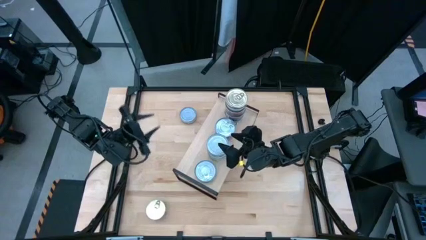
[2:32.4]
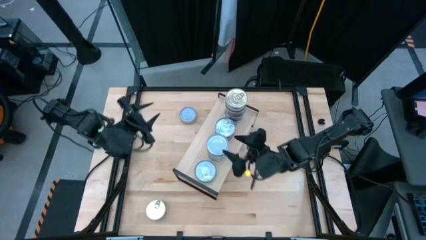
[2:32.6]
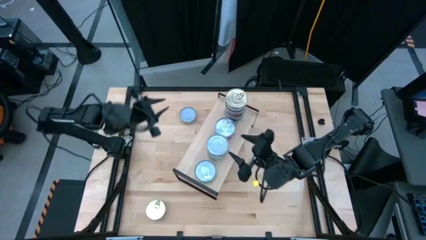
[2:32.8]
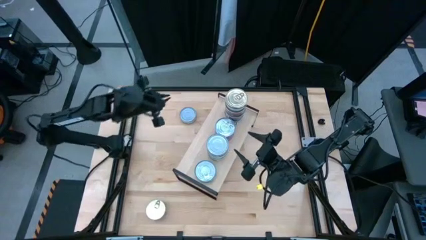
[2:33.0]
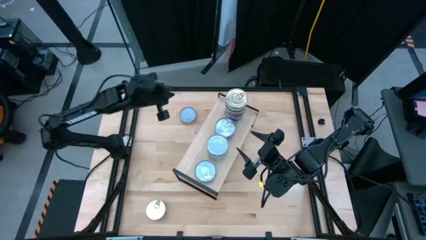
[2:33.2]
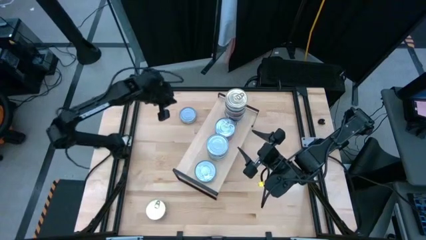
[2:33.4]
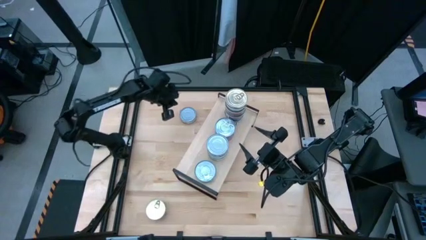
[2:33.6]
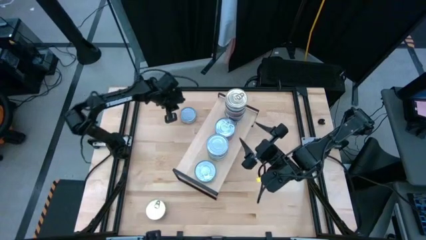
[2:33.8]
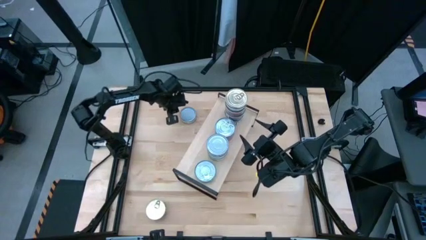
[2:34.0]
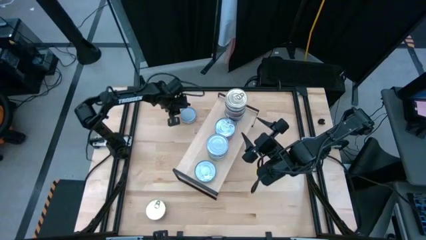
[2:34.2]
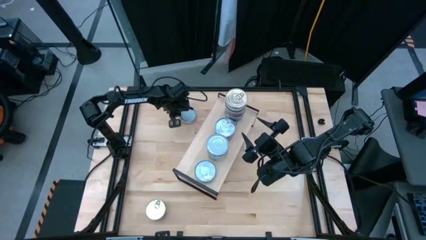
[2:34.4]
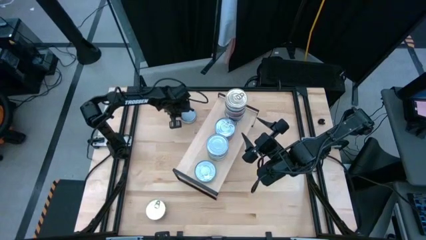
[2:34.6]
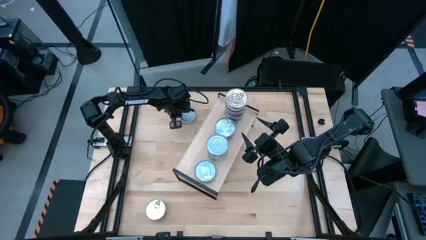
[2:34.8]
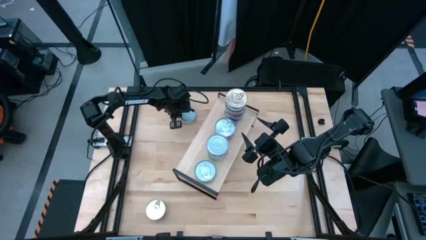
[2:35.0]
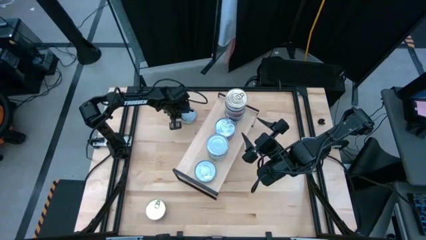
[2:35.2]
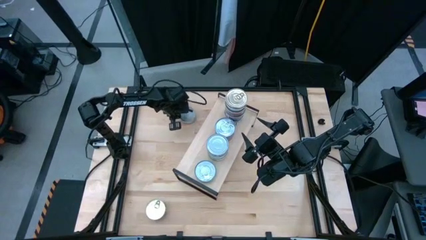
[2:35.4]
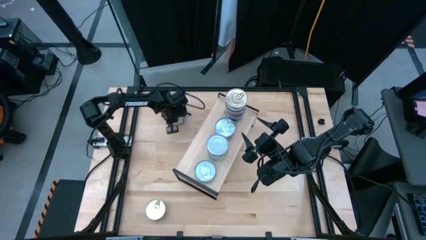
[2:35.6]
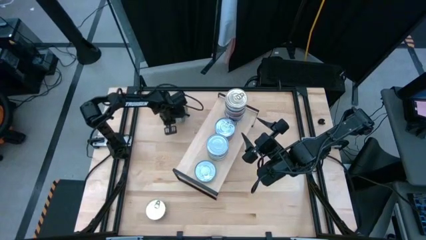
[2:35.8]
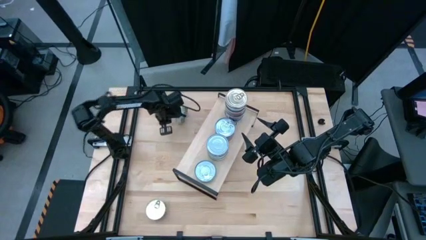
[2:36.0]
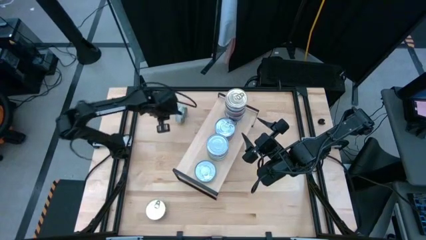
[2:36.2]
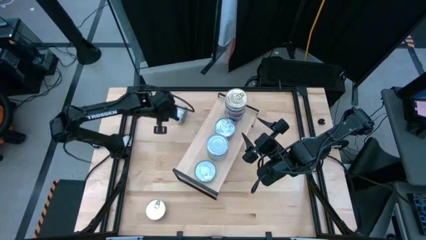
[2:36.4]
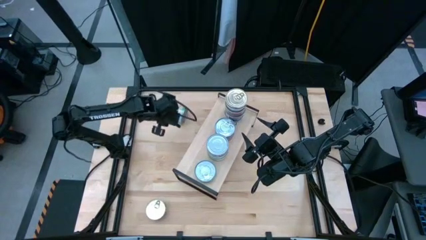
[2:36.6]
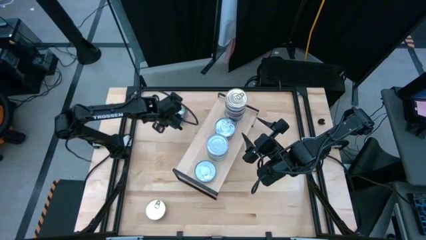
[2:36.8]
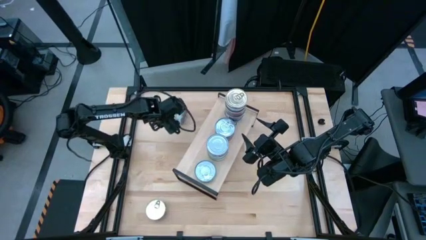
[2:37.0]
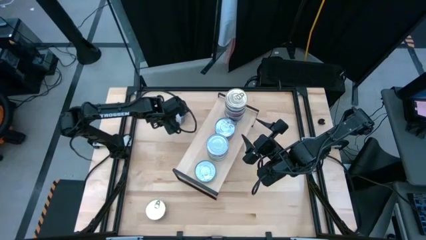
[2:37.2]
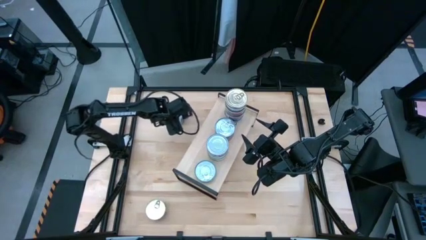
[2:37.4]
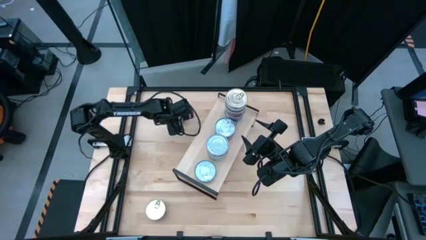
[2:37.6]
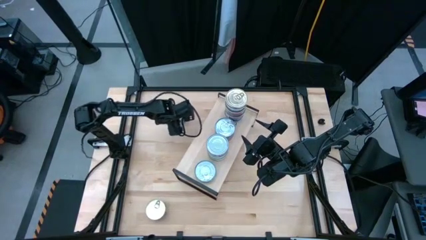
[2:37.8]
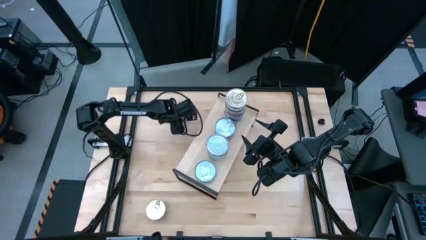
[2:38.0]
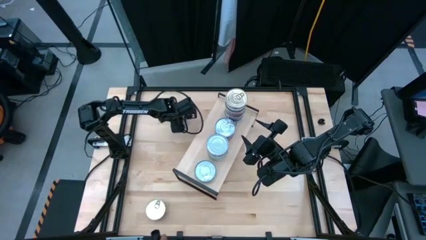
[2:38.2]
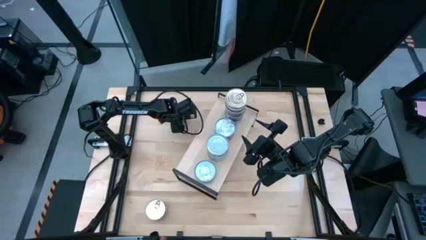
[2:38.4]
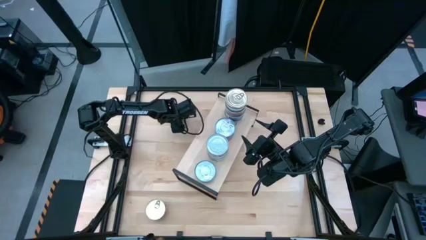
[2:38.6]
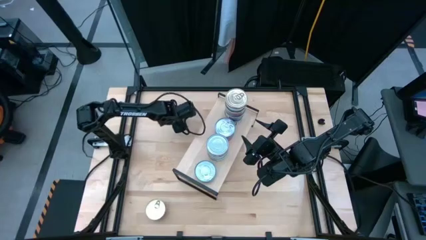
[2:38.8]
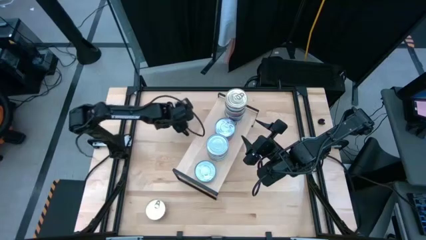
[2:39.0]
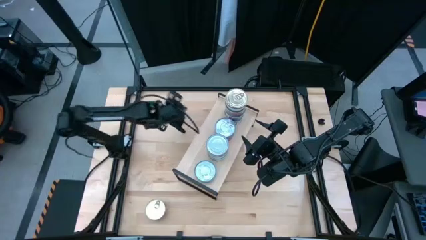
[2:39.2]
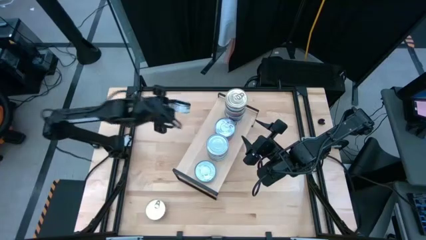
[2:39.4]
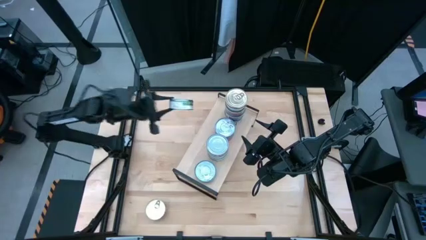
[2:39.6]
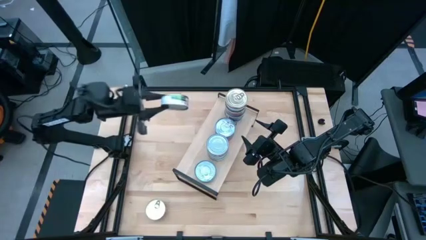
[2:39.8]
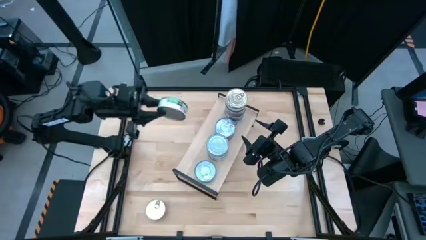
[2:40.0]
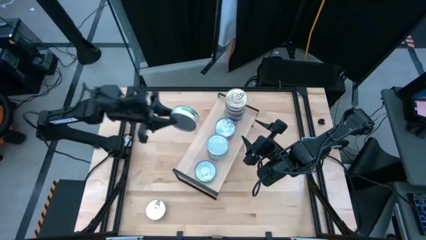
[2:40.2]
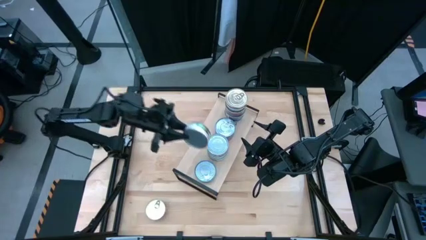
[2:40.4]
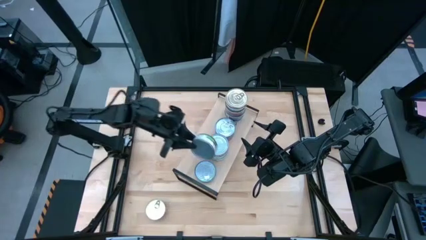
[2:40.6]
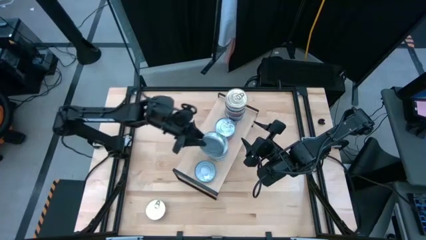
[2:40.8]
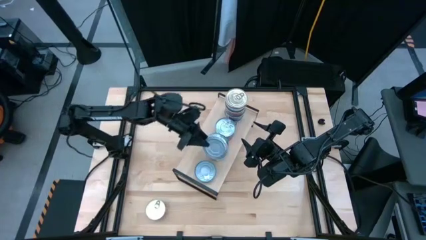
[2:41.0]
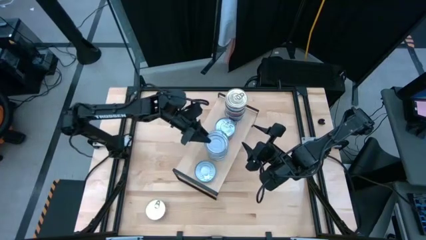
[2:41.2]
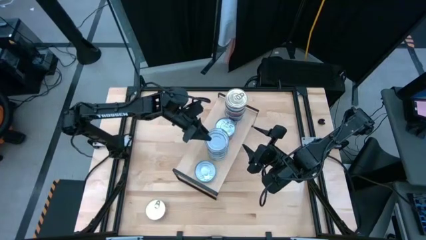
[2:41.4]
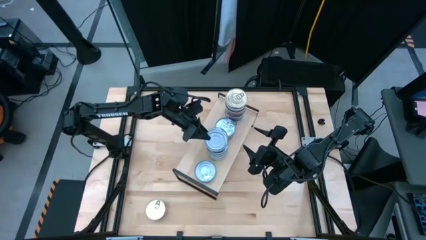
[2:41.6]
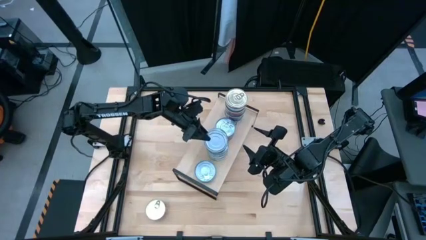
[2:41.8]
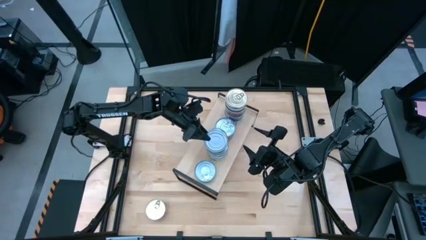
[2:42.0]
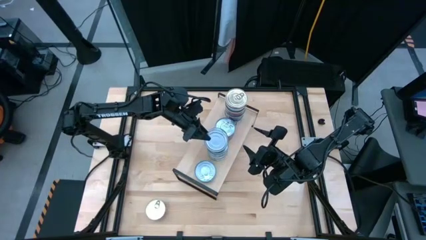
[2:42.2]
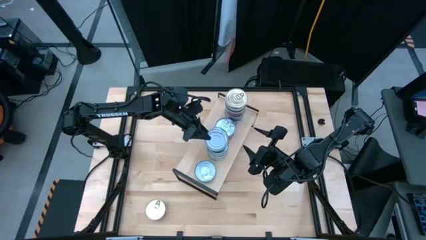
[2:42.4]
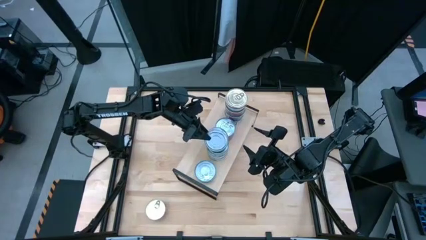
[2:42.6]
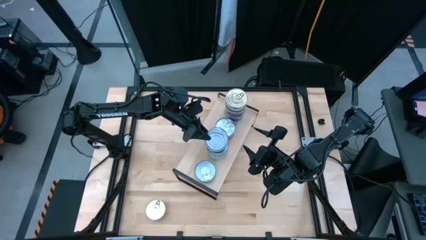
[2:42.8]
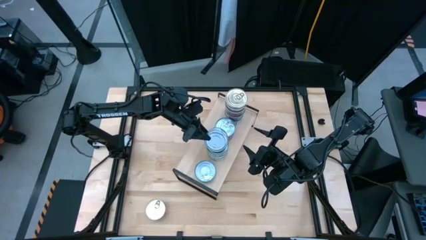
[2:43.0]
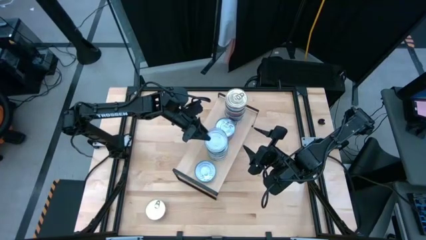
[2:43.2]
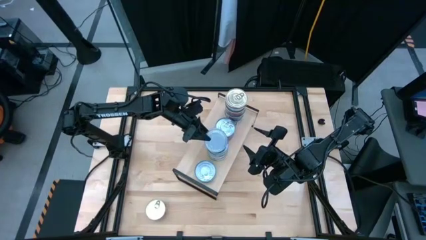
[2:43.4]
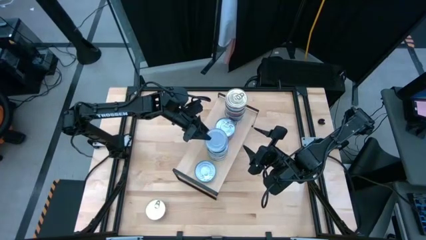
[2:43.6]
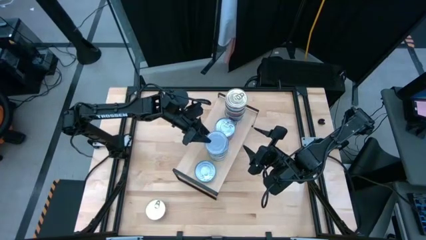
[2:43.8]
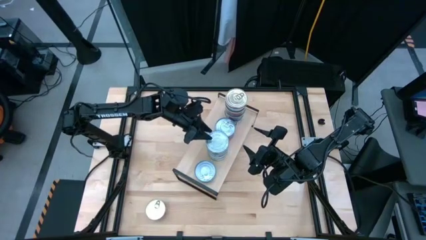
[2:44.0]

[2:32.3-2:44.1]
Task: Stack canned seafood by type on shelf
Stack the green tuna can on top of the green tuna can on the shelf

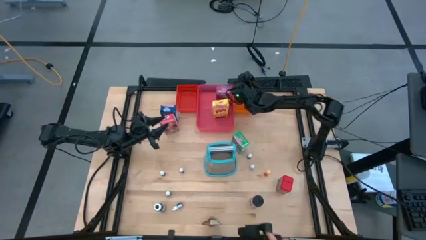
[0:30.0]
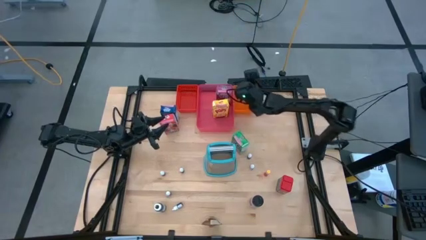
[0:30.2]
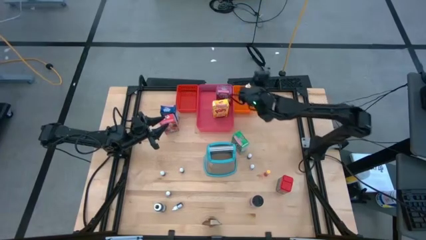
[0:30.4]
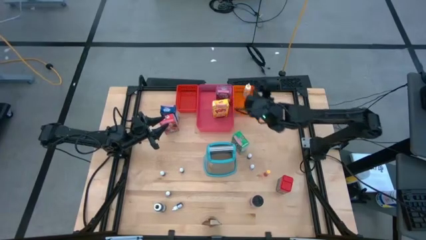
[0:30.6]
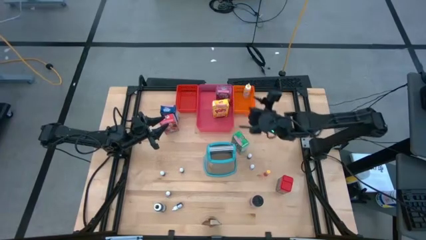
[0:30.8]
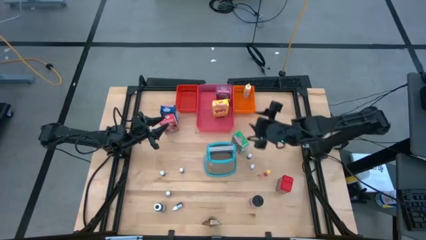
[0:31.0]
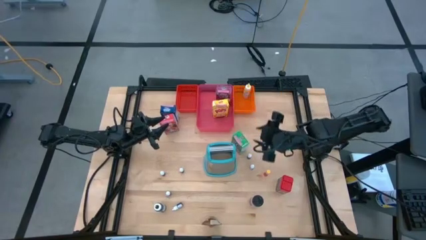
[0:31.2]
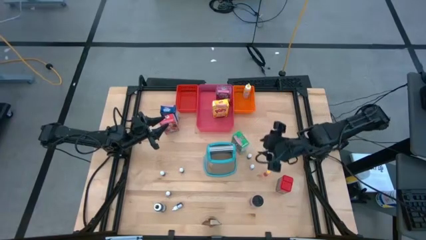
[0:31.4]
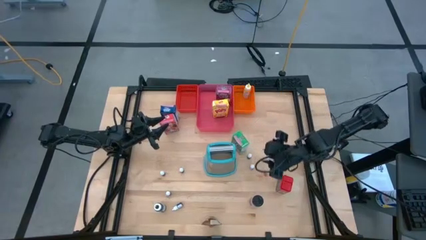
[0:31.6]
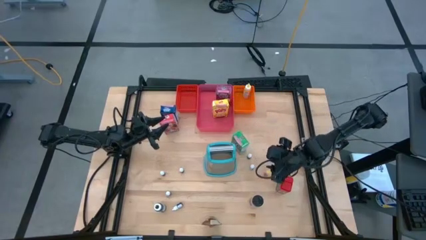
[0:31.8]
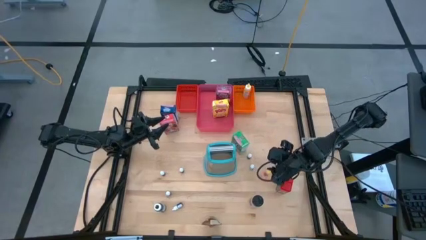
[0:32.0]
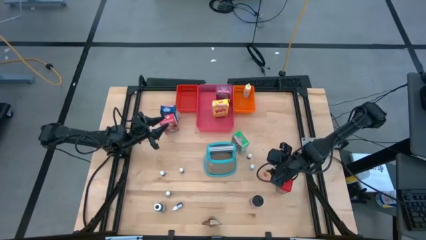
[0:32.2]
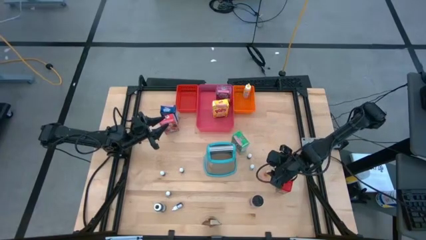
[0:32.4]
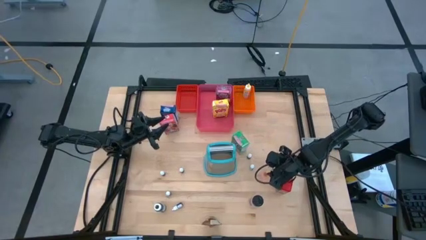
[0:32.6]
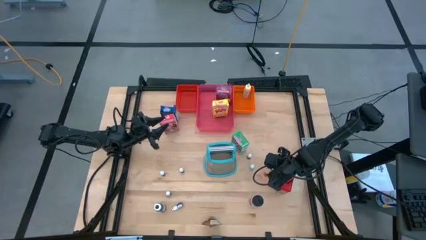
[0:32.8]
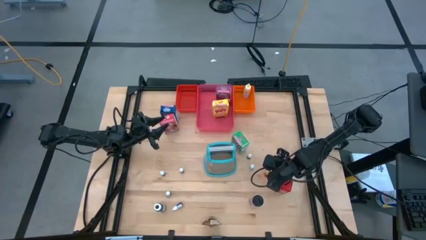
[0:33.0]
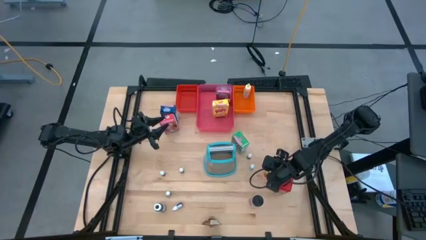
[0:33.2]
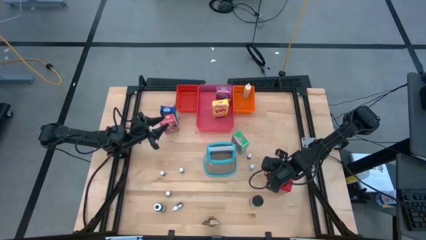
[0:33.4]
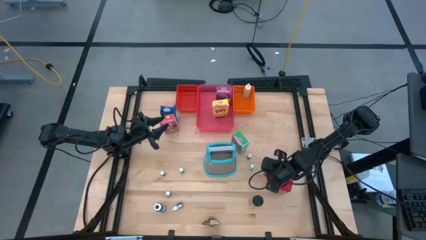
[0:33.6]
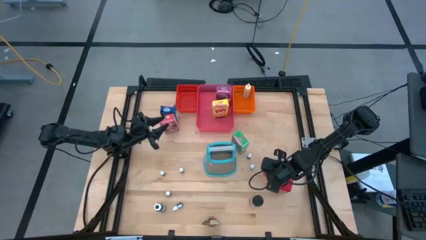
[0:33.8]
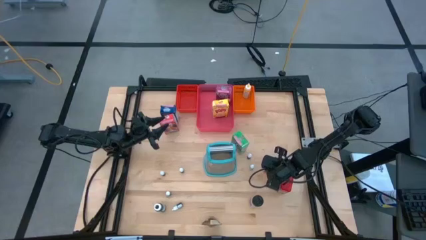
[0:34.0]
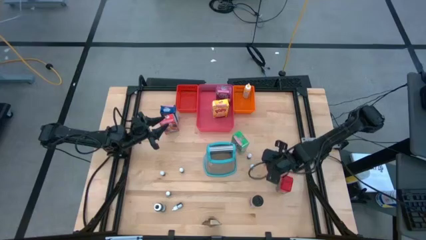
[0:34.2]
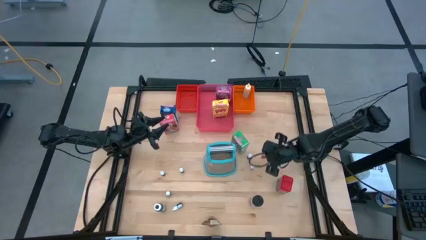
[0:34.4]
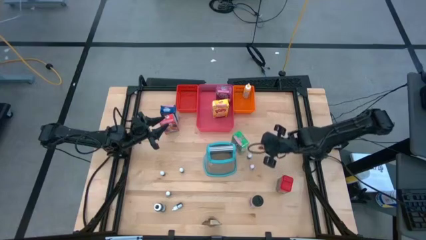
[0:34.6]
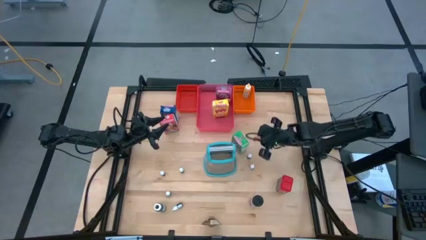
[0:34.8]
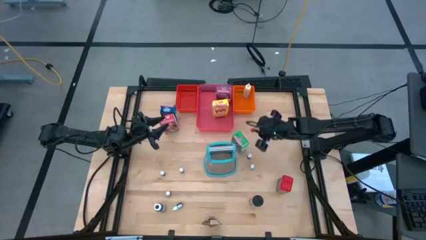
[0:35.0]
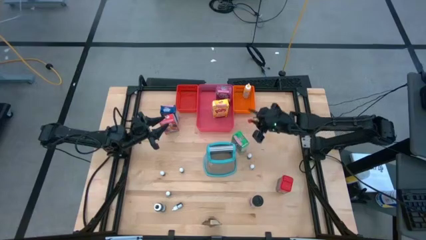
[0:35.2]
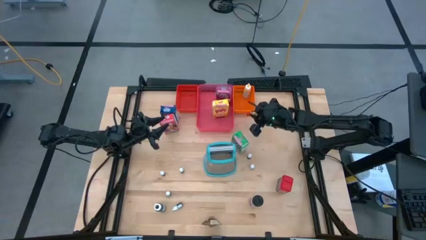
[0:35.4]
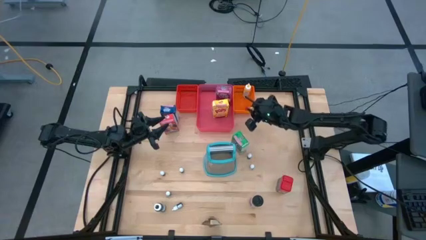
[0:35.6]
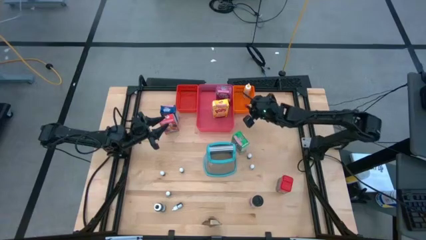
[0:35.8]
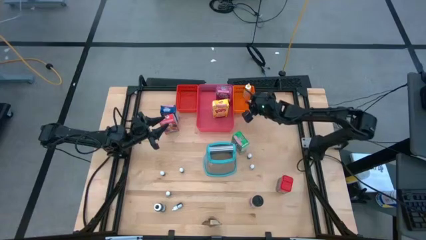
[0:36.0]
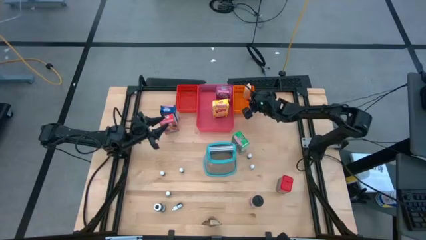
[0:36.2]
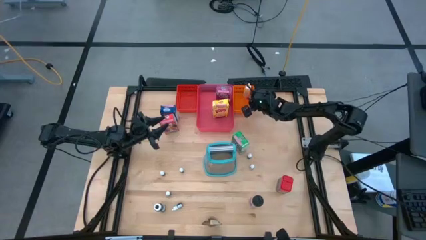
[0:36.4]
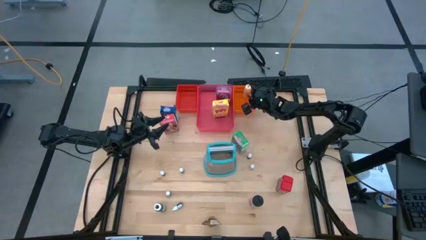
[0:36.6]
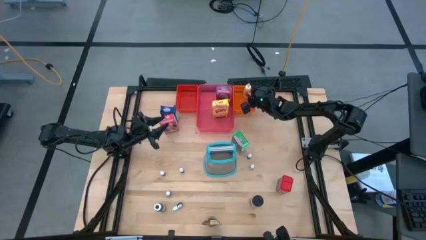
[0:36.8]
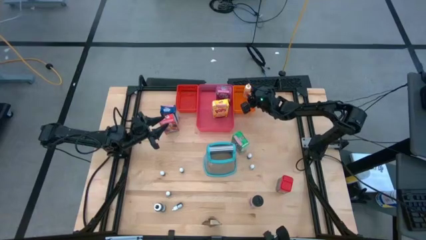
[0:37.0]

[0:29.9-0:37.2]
Task: Pick & Place Kitchen Items
Put the small yellow food coloring bottle into the orange bin
